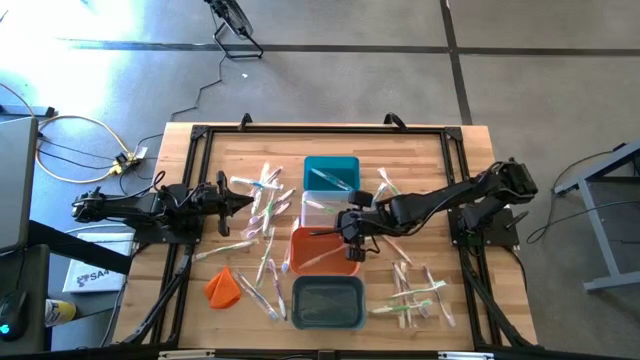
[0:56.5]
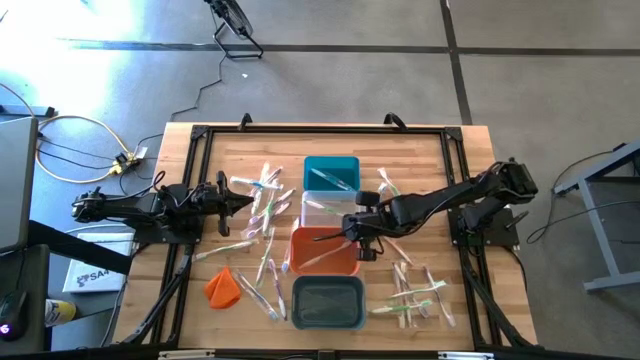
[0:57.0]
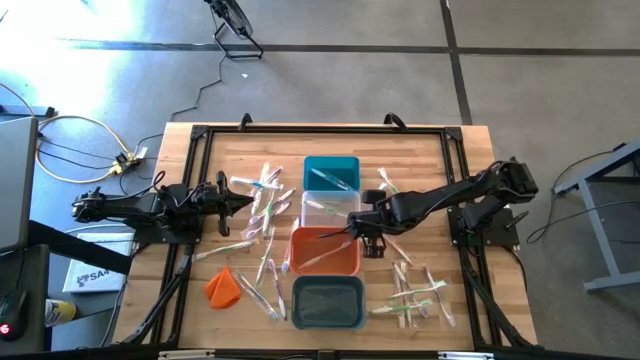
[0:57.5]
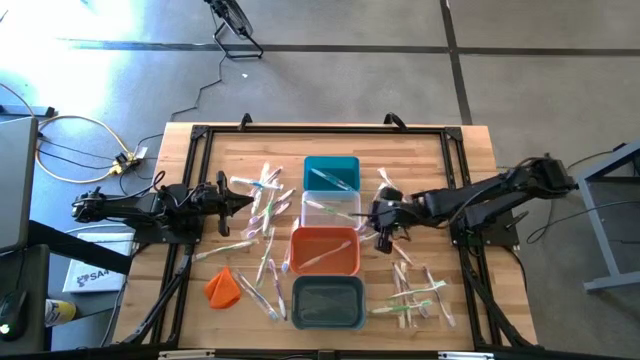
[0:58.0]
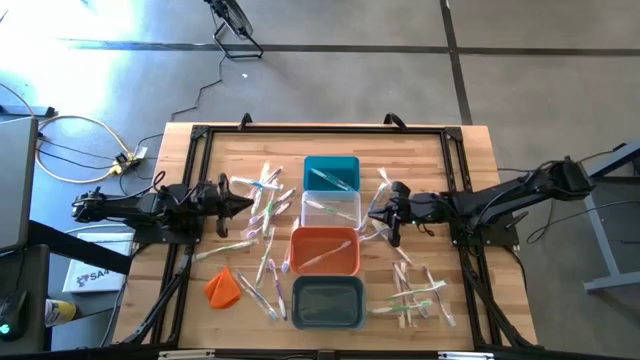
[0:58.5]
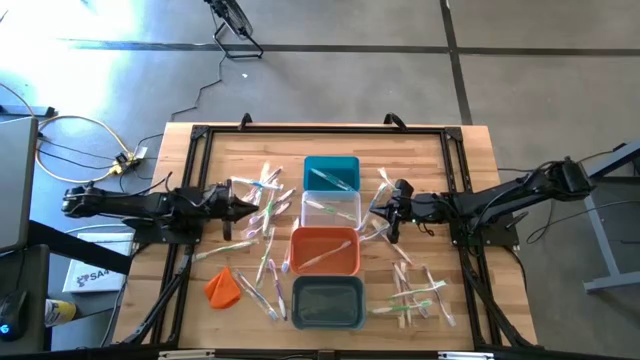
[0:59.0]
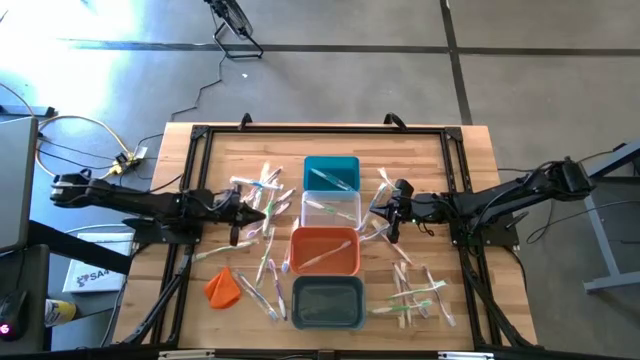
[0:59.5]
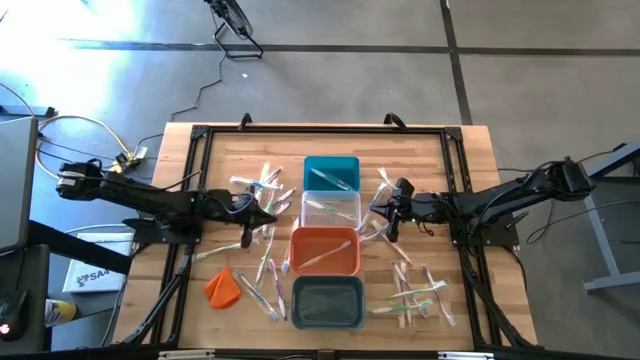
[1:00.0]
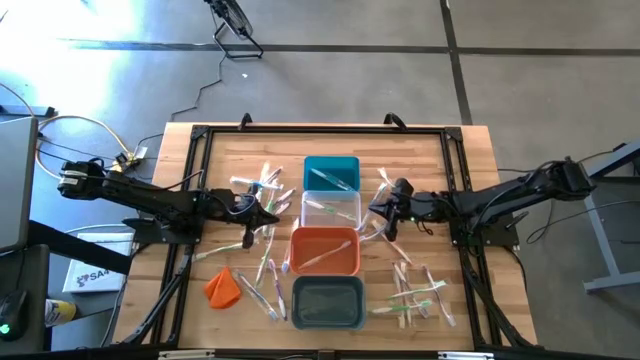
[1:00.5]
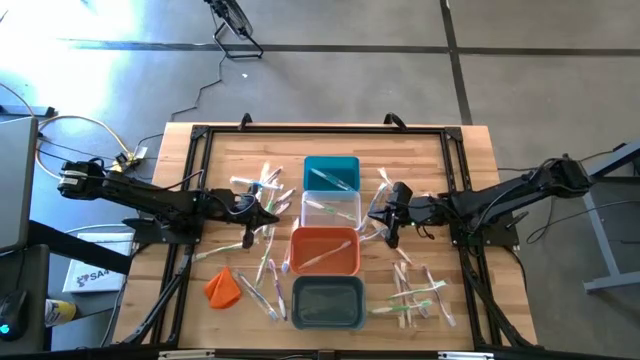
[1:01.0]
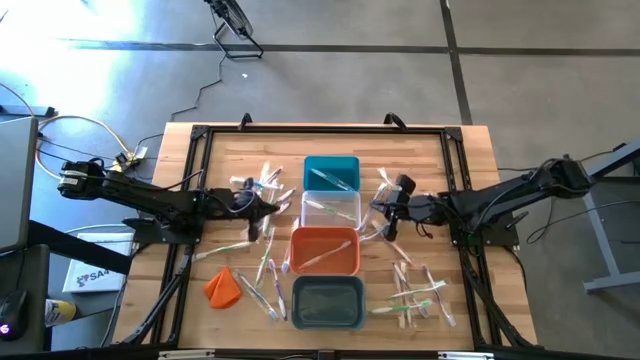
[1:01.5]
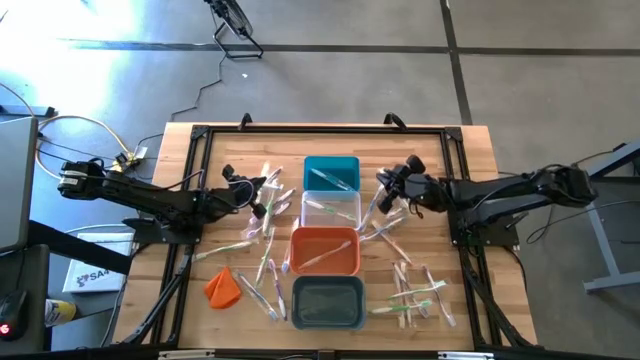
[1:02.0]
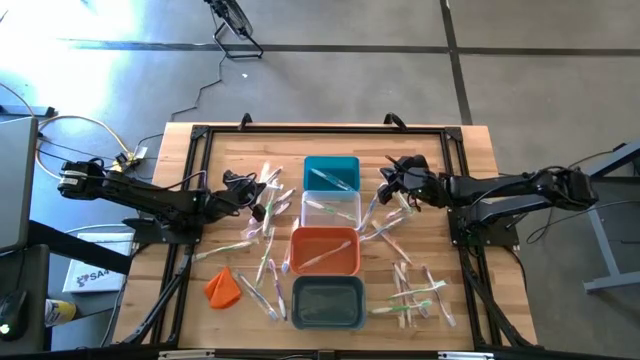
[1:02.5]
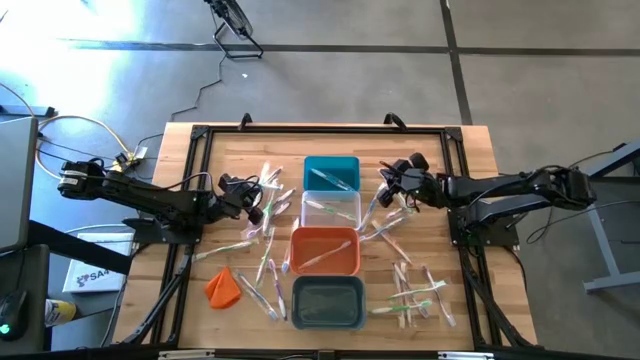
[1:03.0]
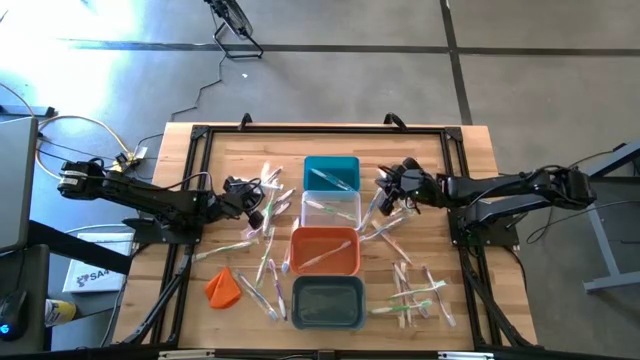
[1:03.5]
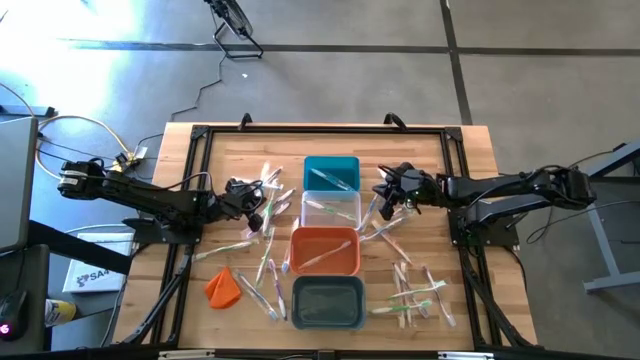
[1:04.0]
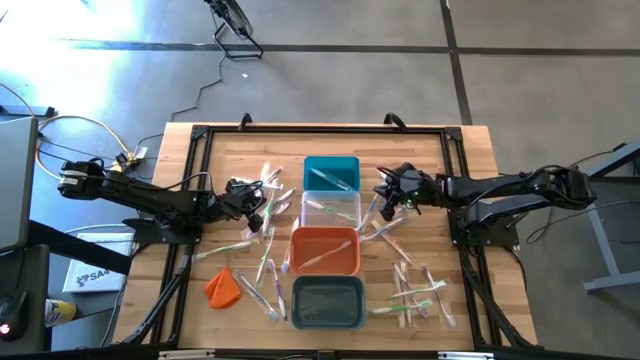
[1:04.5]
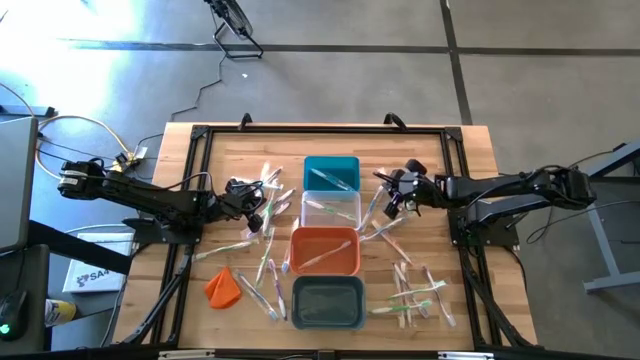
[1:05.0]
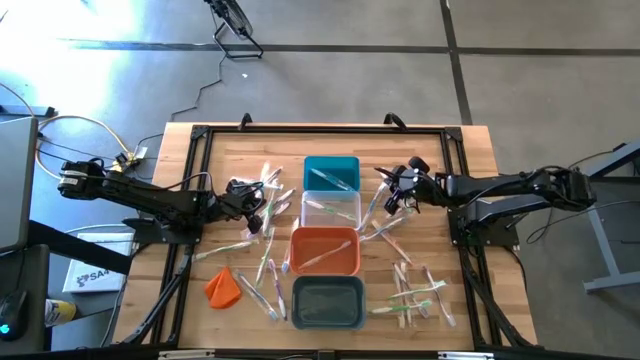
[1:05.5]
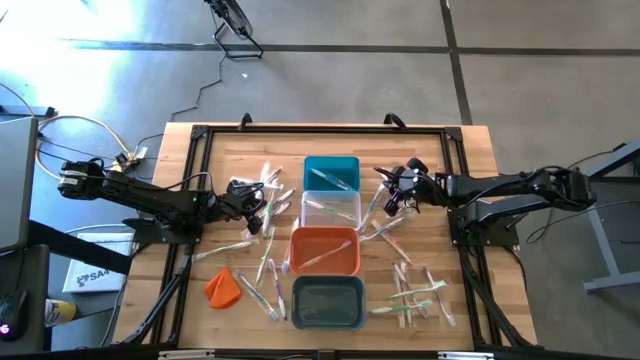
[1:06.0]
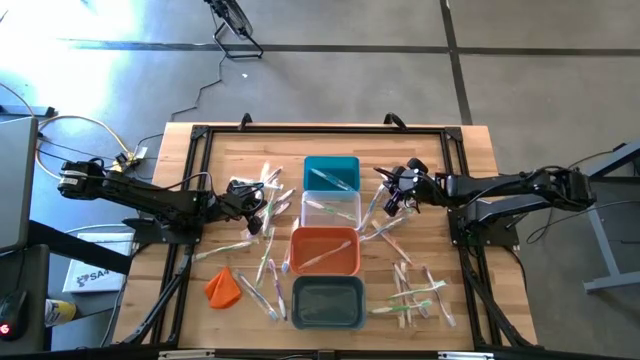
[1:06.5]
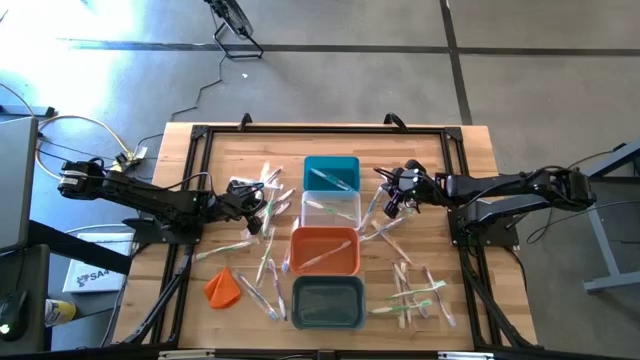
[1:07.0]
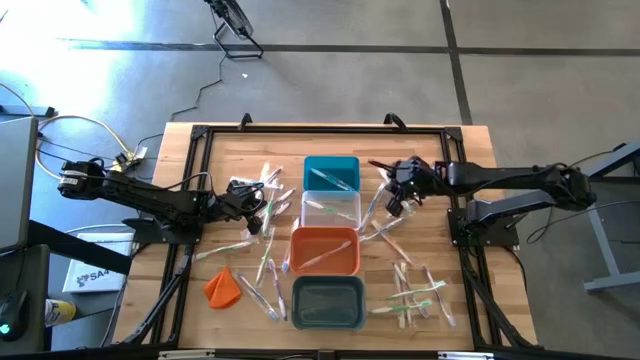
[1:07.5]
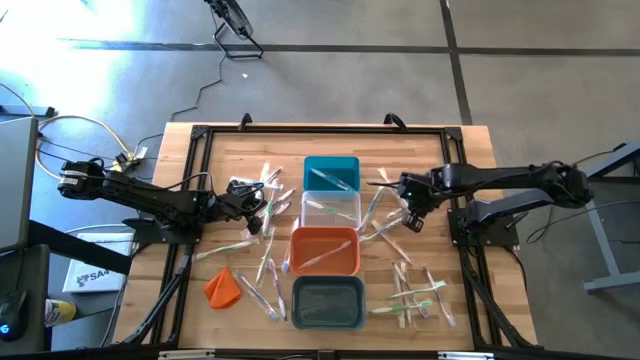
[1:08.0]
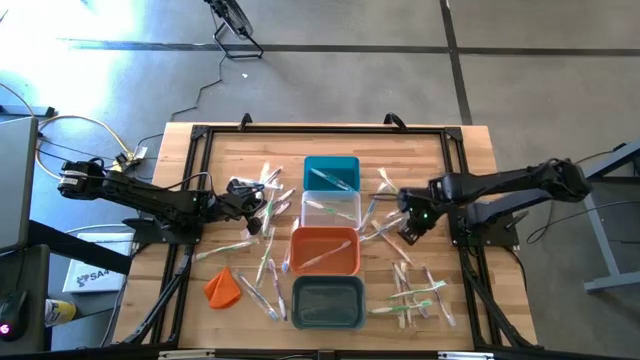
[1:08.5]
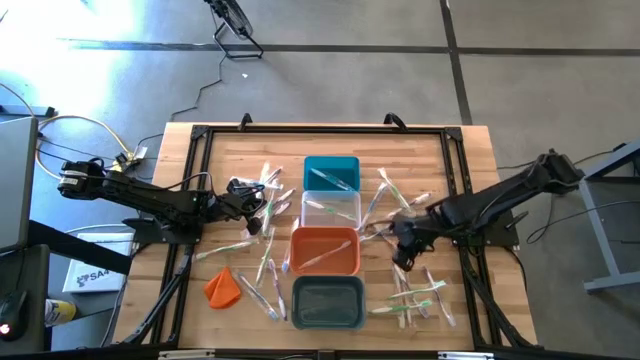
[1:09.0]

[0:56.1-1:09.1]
Task: Pick & Place Toothbrushes
Put the violet toothbrush into the green bin

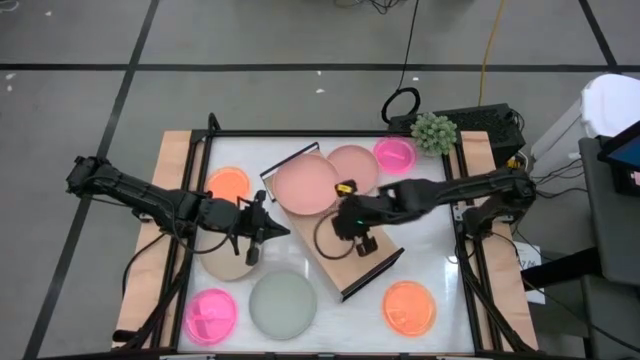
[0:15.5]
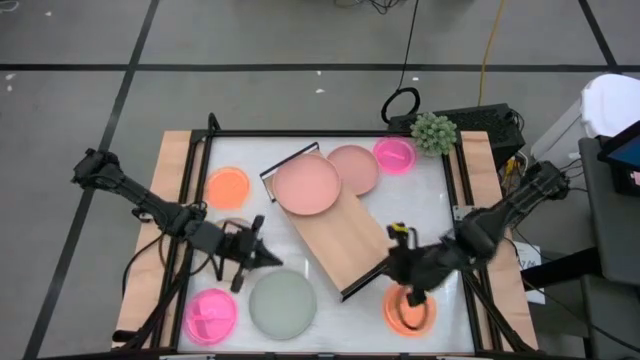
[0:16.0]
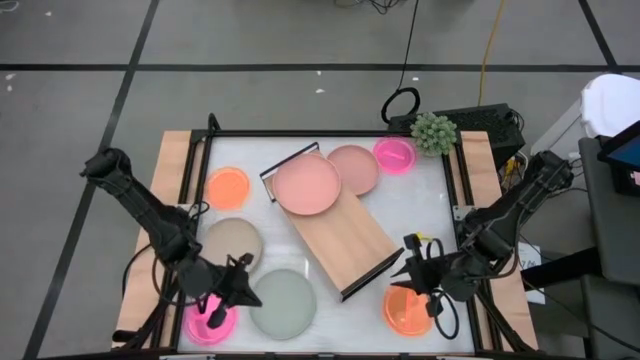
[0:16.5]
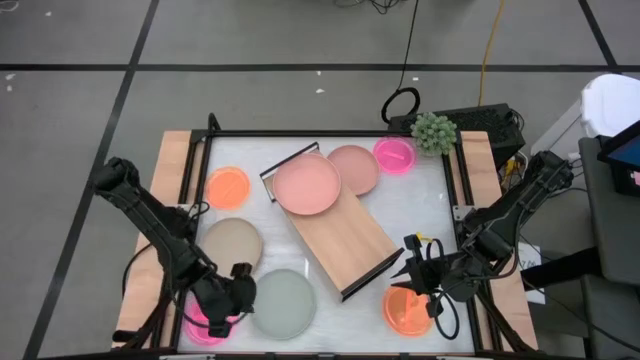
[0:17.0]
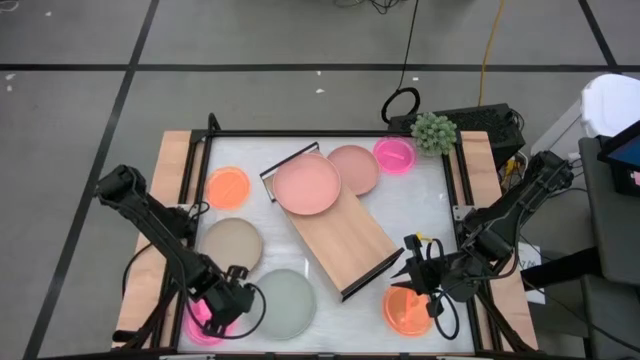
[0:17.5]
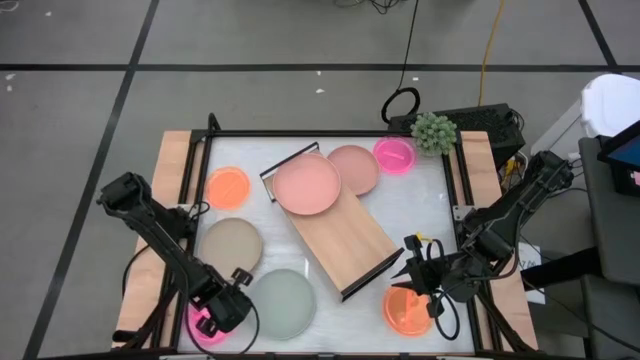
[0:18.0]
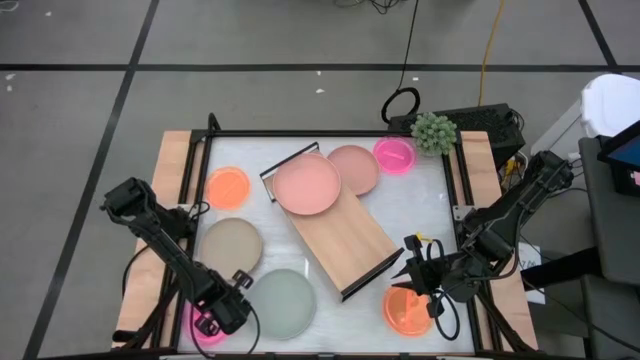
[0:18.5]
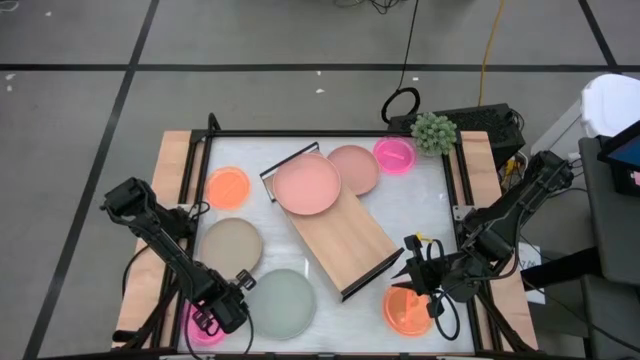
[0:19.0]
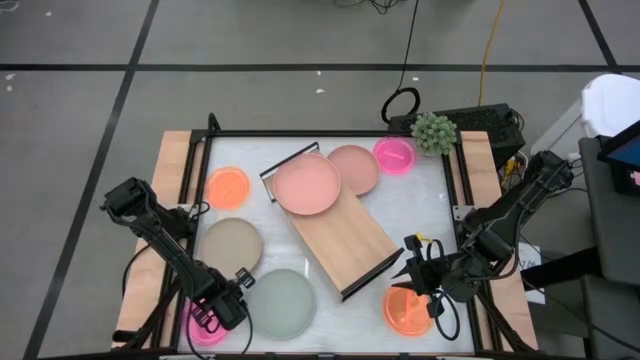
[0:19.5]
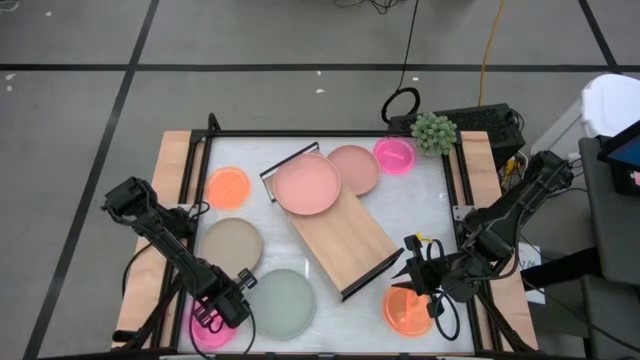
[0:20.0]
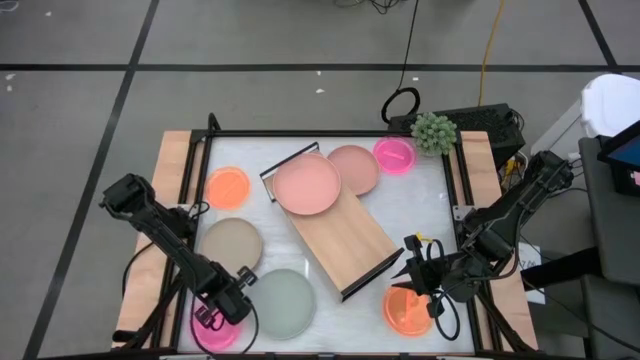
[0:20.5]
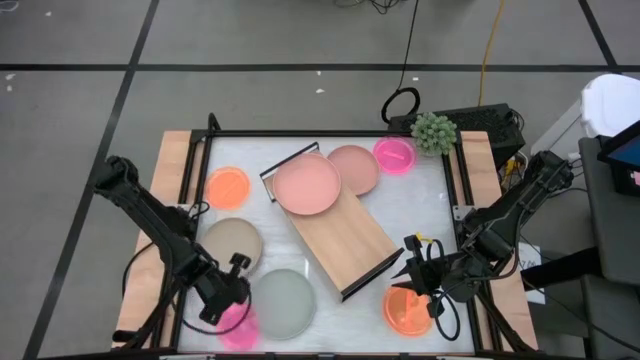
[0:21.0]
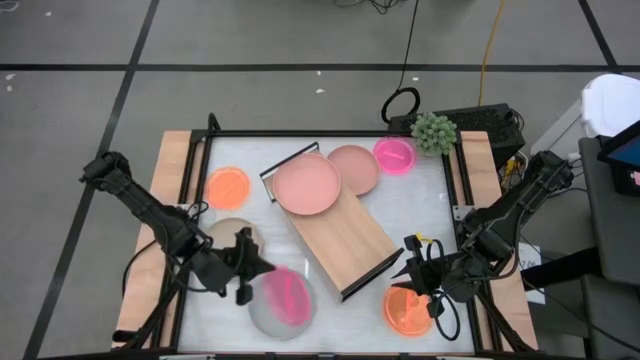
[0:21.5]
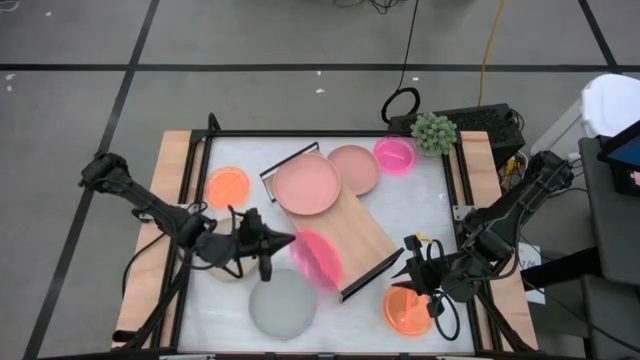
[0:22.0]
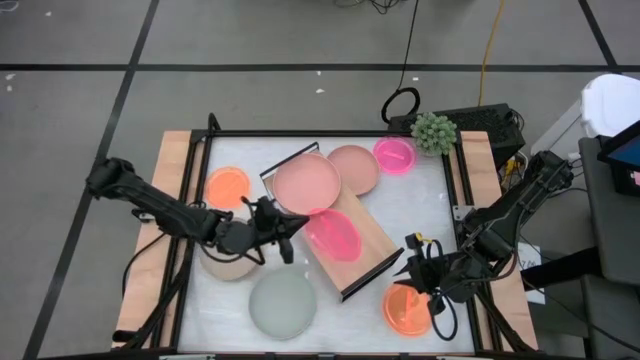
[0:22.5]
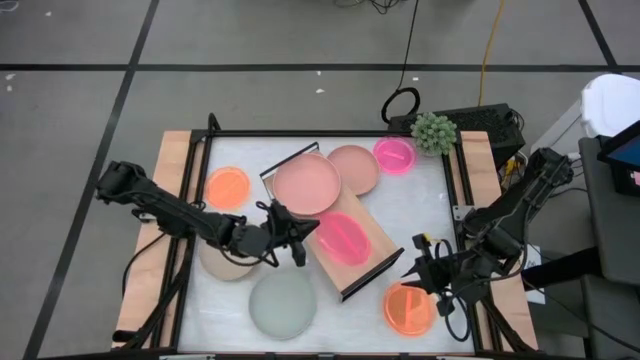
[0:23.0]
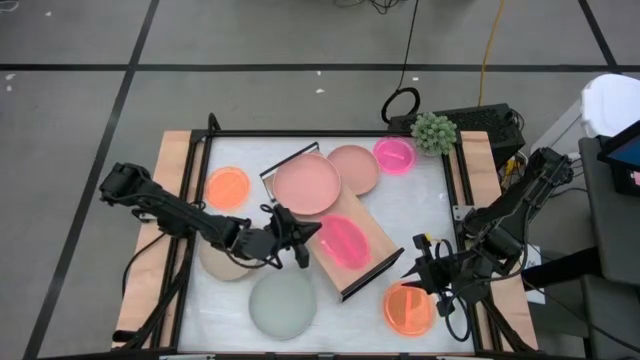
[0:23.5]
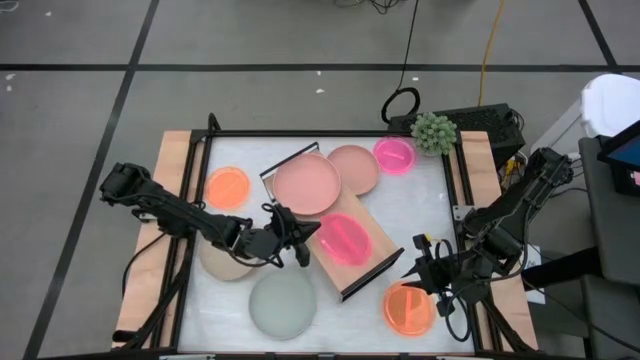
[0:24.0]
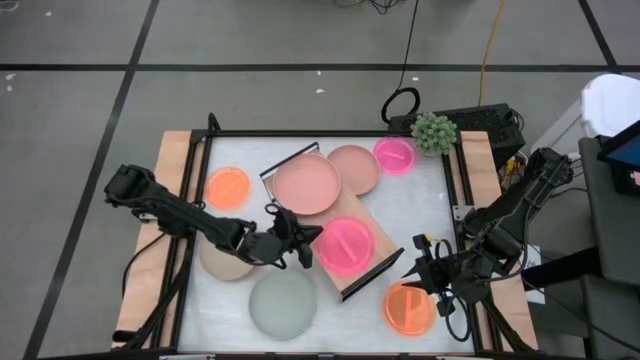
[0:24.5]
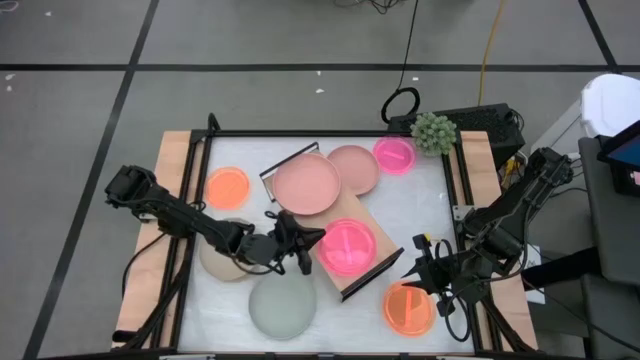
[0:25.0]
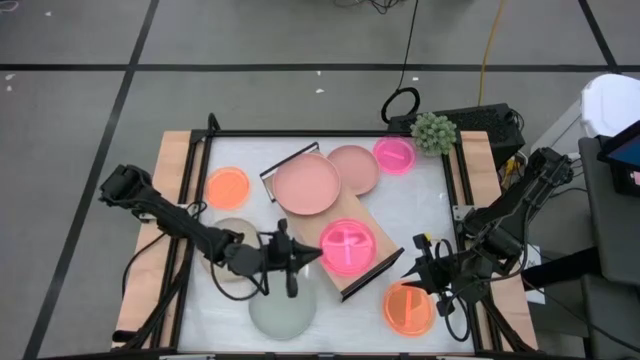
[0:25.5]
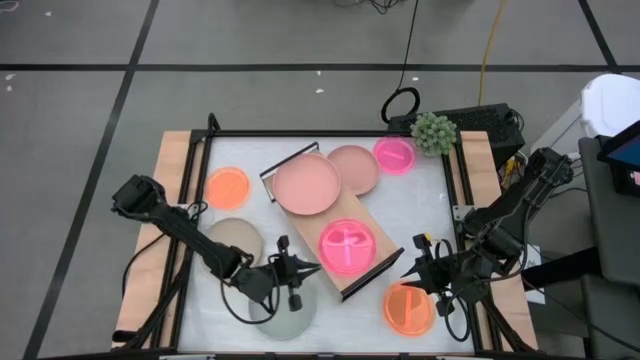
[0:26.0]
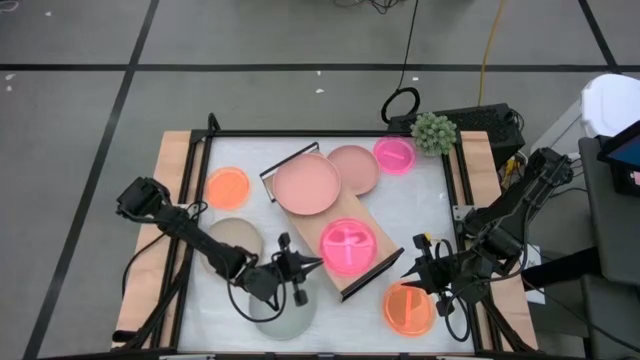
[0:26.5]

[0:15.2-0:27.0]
Task: Place and stack plates onto a shelf
Put the bottom small pink plate on the shelf
